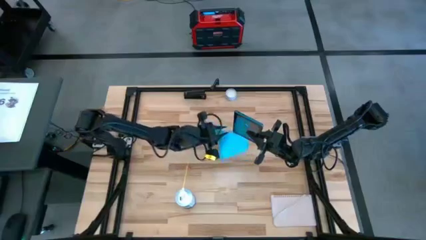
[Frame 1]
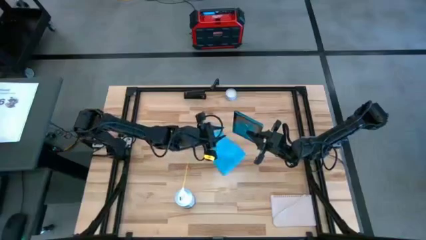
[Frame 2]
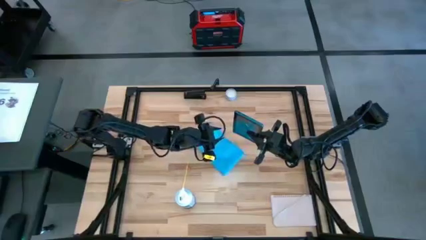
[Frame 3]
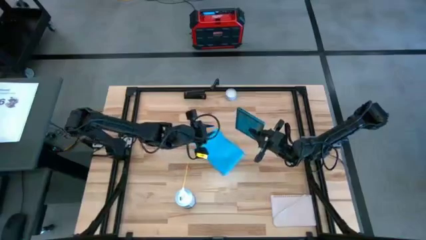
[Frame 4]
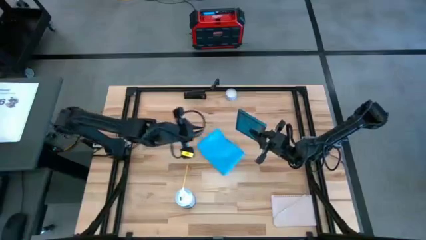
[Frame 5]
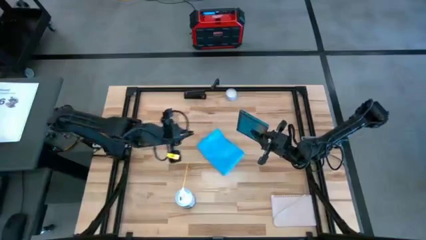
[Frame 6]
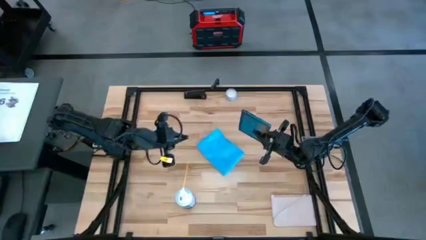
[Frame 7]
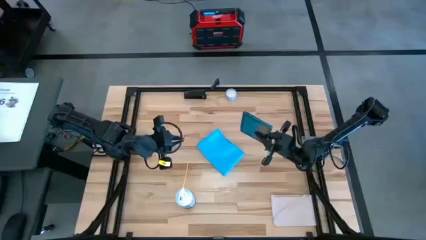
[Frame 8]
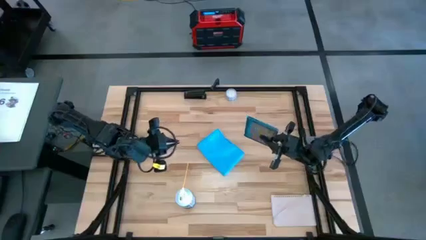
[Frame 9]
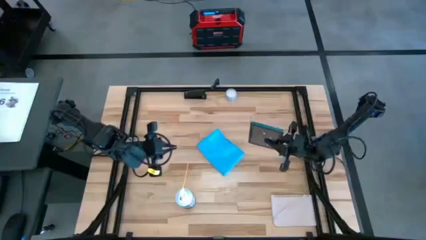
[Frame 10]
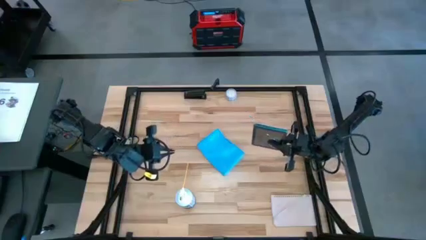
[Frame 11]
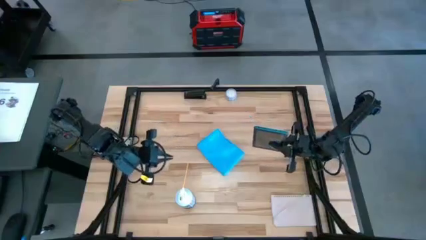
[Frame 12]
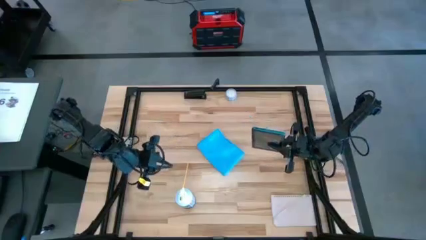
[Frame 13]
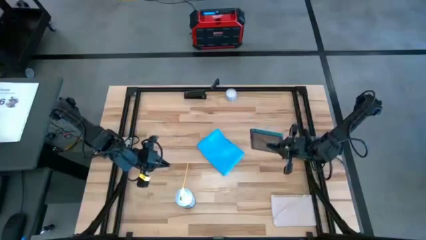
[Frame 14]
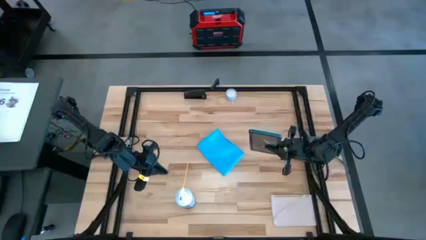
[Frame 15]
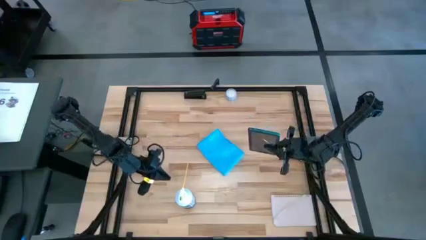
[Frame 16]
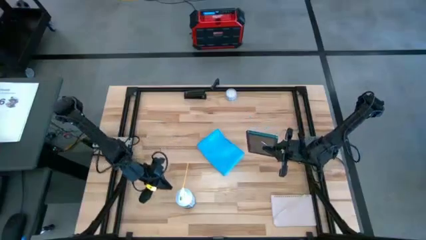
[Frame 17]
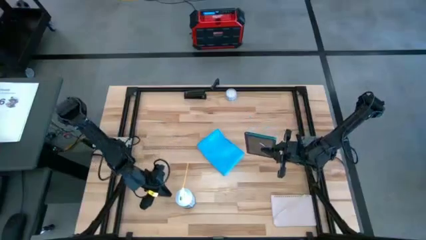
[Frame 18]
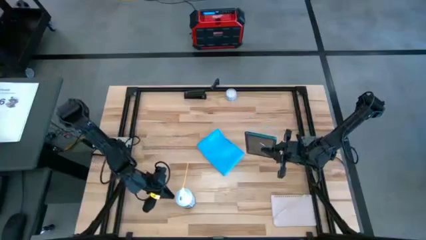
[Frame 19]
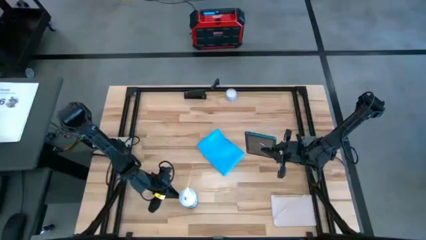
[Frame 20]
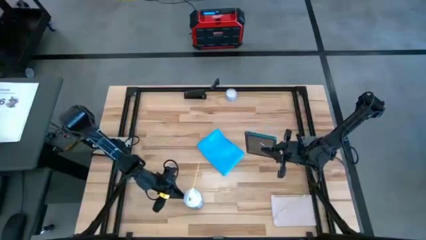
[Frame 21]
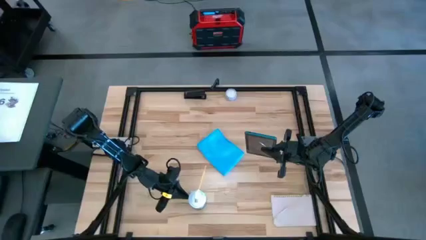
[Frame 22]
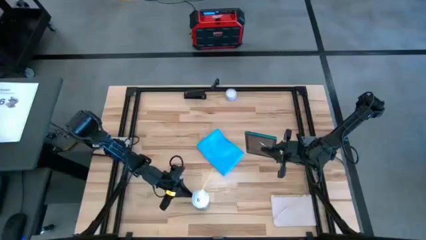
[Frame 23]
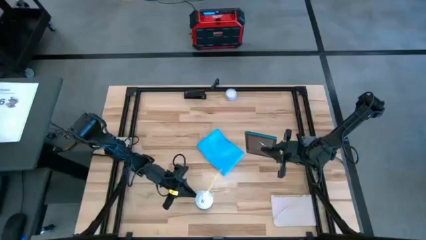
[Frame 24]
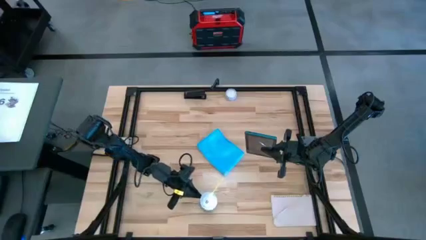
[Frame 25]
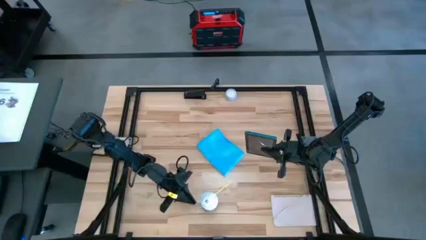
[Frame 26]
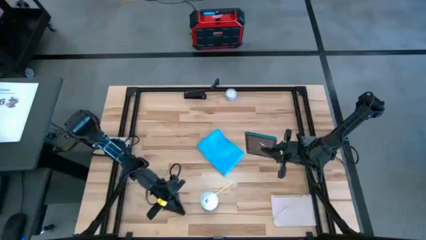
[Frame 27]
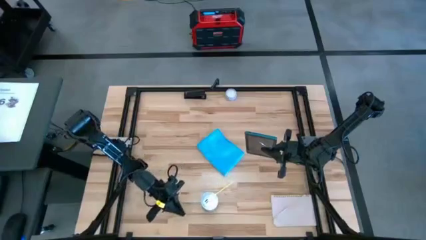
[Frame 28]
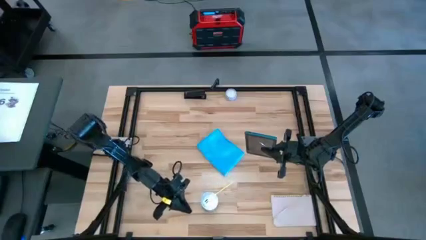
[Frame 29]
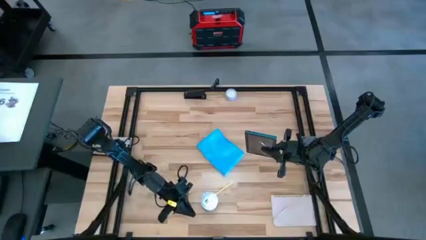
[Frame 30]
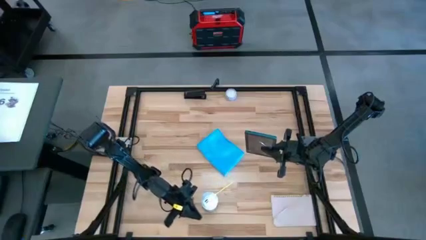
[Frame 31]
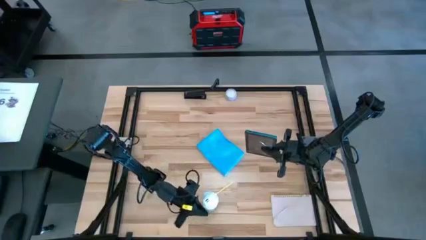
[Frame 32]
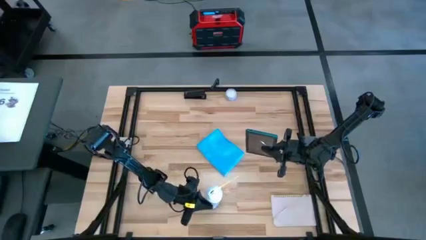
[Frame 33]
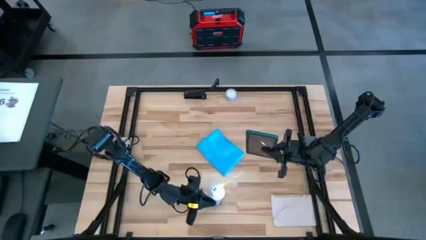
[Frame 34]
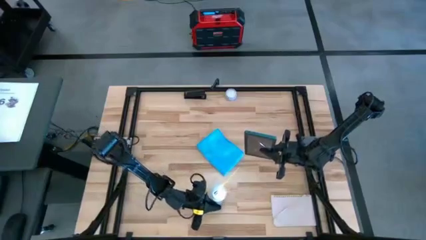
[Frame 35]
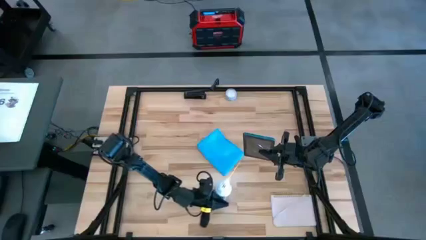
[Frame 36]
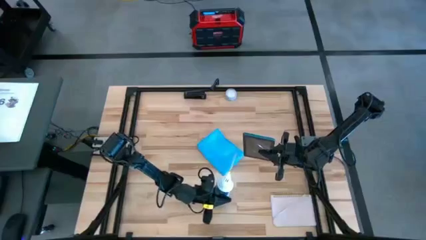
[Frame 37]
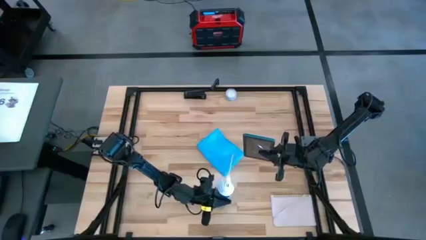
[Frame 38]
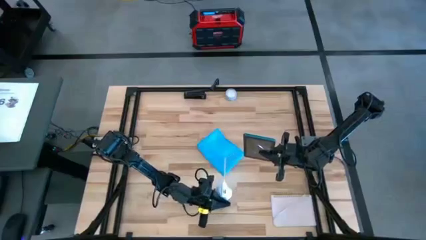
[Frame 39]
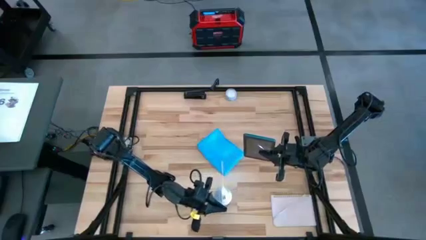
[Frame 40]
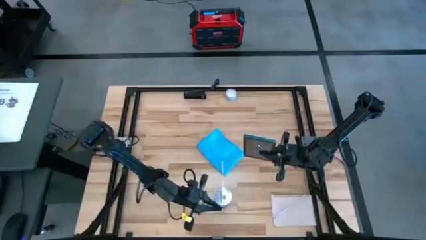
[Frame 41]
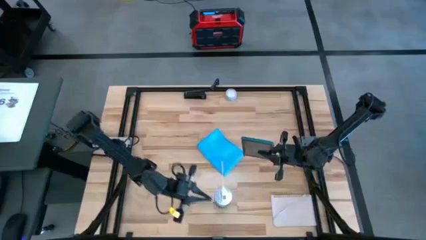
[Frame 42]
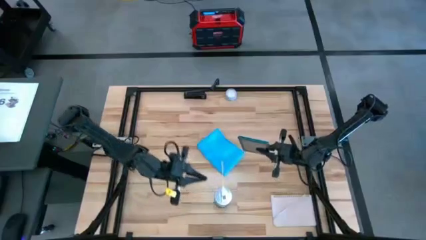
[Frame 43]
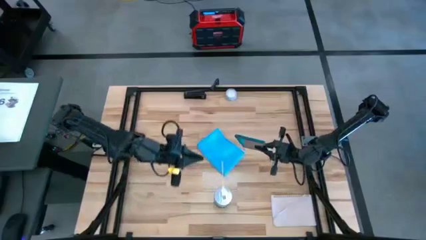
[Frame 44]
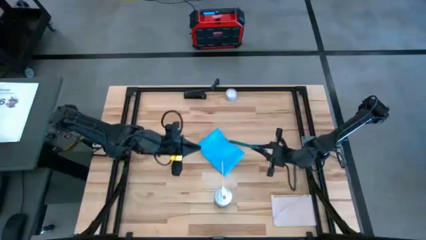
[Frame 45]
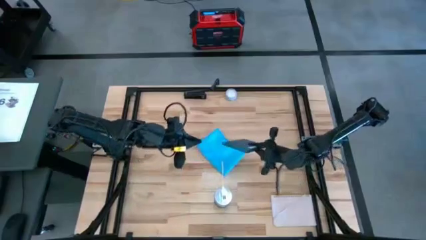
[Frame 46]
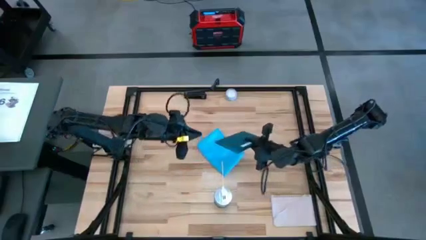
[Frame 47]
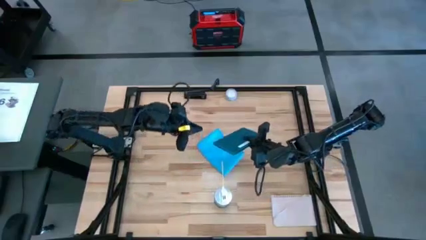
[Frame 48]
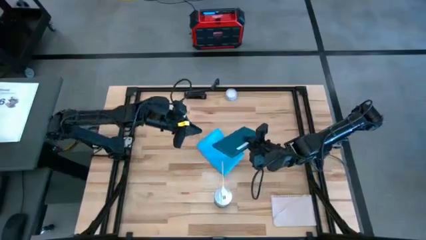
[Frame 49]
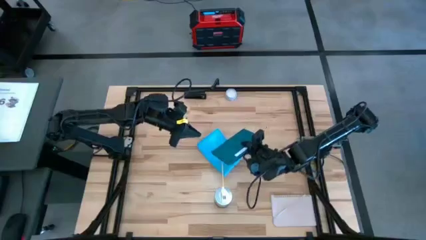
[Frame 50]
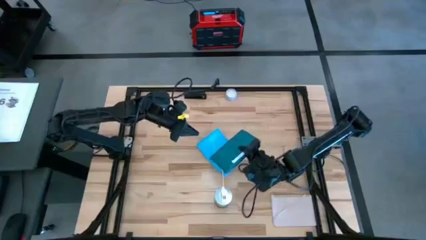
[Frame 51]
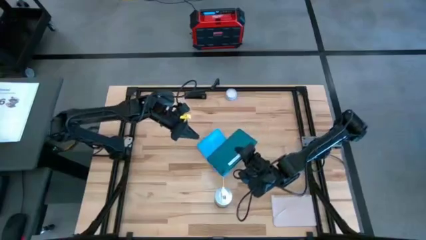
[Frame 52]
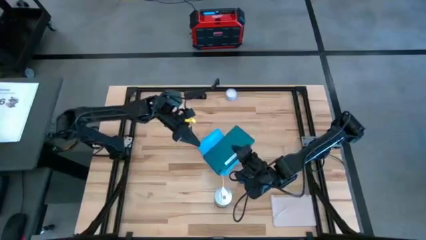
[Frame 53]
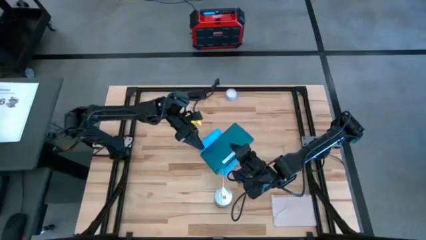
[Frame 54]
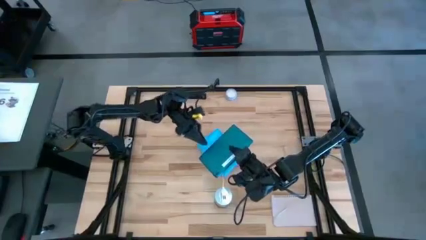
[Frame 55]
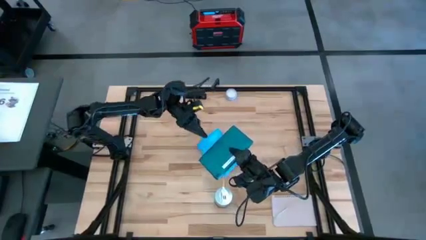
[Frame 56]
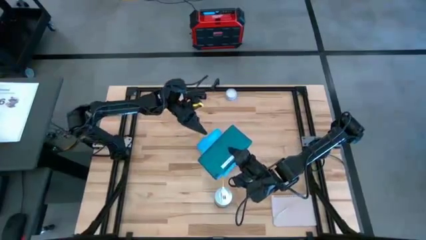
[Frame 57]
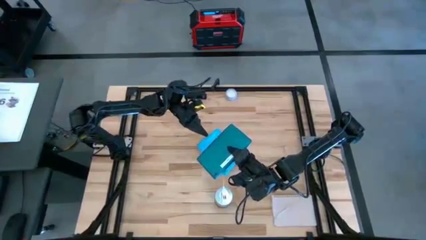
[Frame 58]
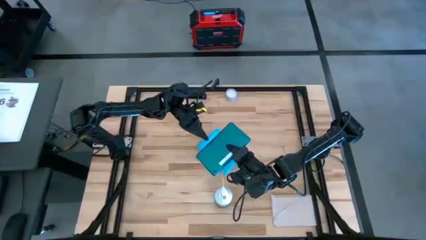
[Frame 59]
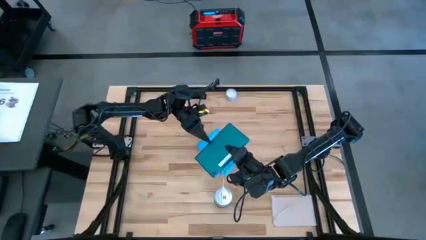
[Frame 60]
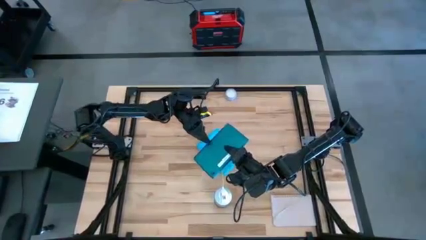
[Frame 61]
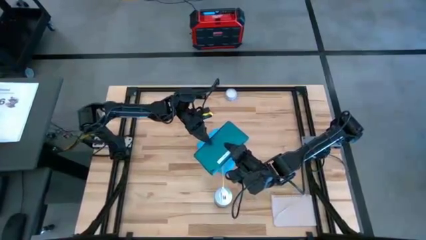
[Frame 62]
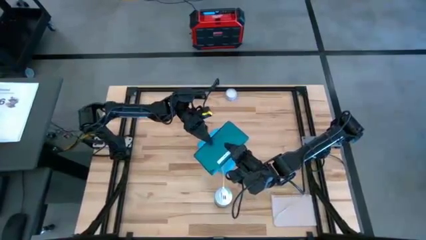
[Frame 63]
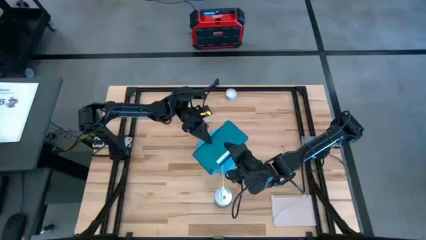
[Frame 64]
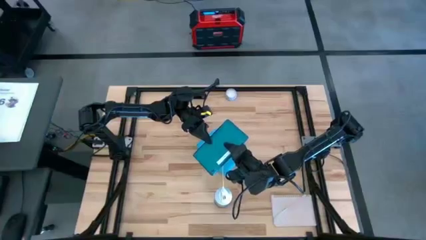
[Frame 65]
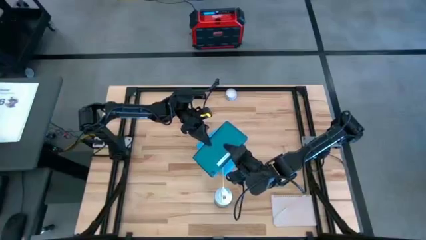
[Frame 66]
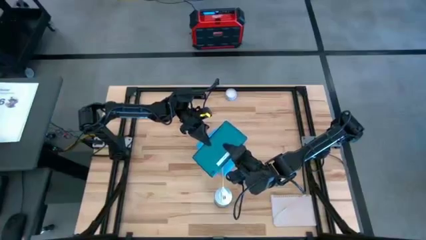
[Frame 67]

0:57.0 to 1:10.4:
Task: Apply microfiber cloth
Spray the back of the black tablet using the spray can

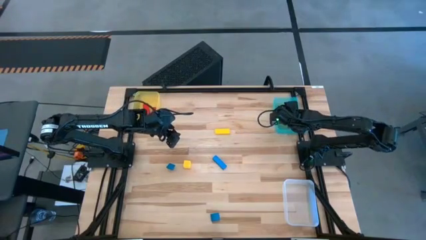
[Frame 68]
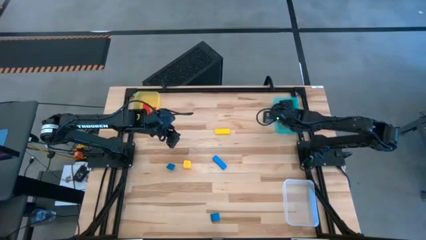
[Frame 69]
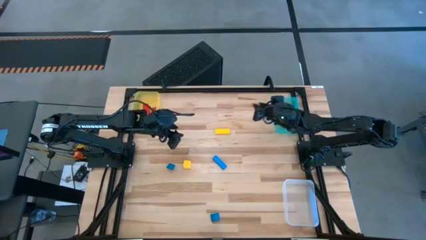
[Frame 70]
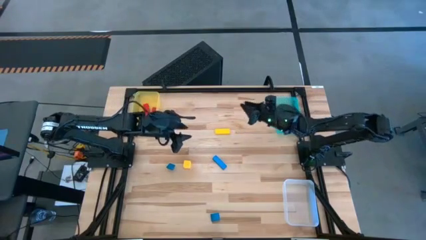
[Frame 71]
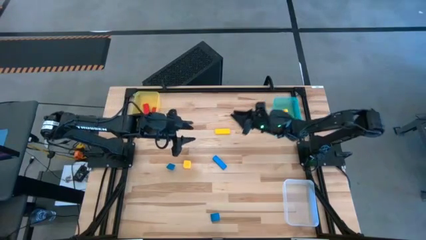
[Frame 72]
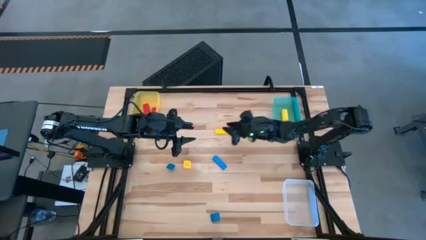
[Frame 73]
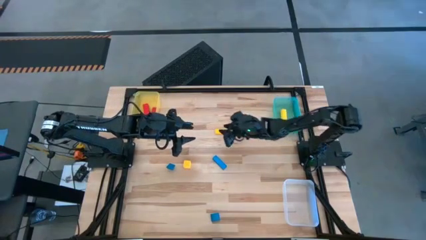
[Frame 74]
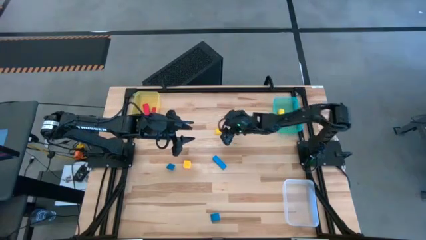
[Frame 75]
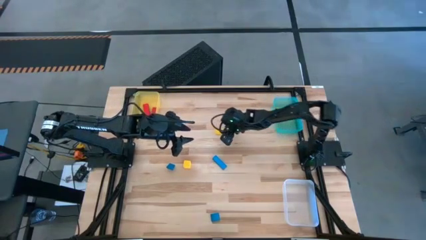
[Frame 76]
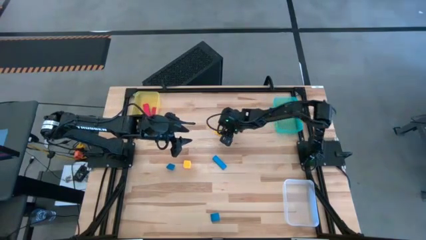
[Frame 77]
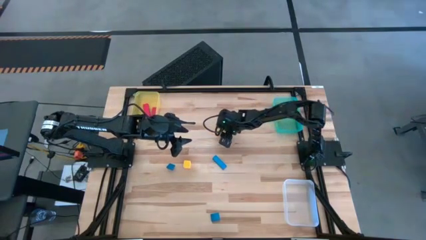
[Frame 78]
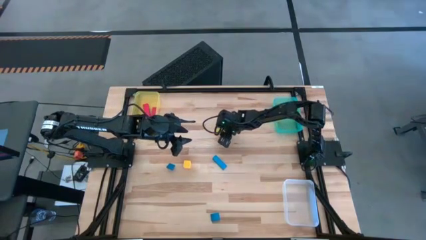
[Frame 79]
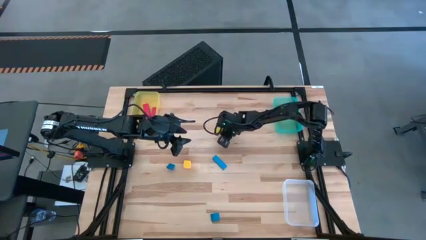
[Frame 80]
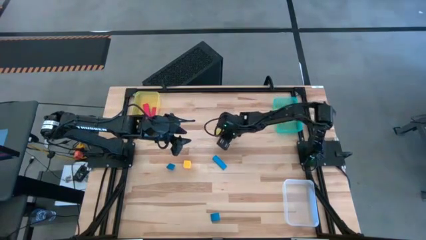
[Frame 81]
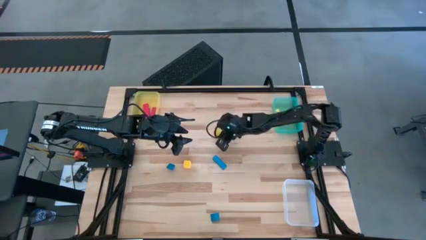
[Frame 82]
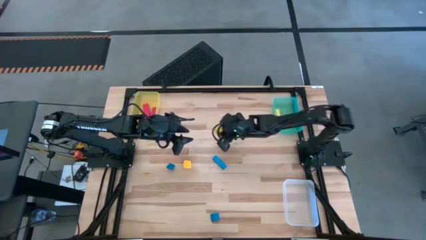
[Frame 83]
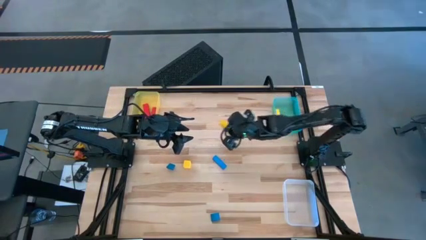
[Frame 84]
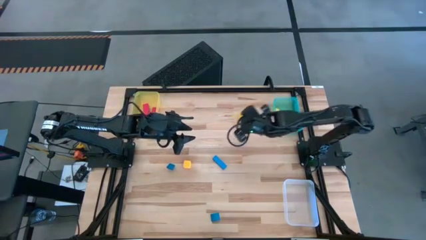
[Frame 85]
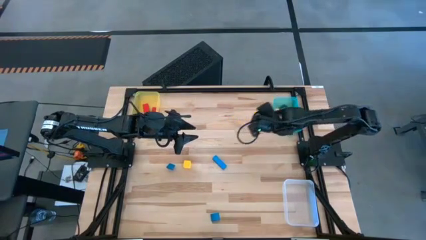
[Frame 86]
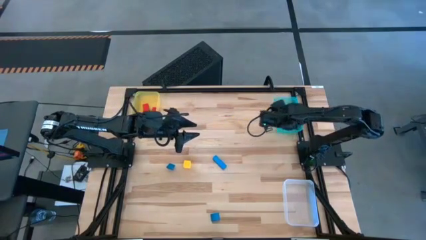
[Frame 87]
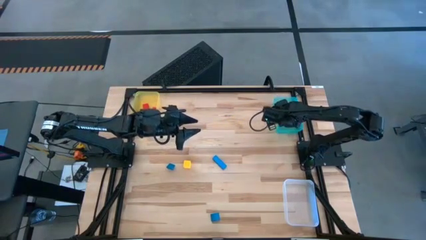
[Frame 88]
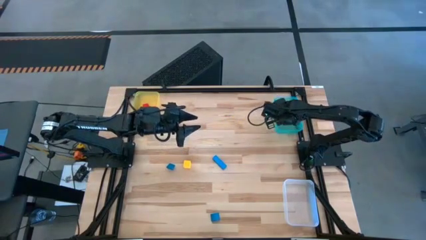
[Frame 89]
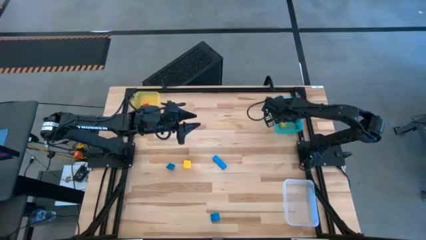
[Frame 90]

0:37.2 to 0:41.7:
Task: Sort & place blocks by color
Put the right yellow block into the green bin
